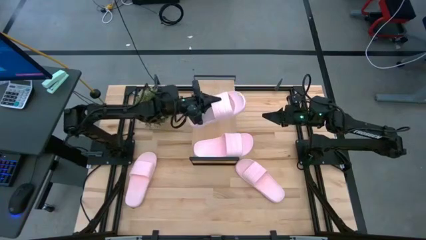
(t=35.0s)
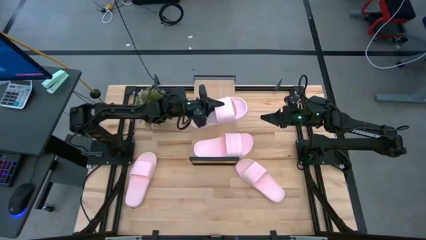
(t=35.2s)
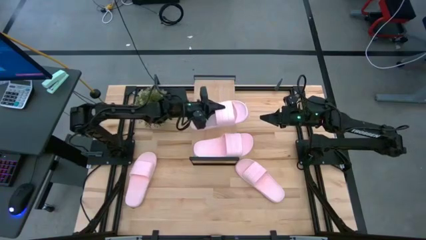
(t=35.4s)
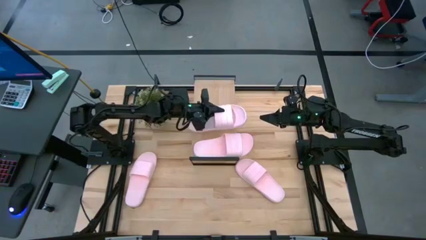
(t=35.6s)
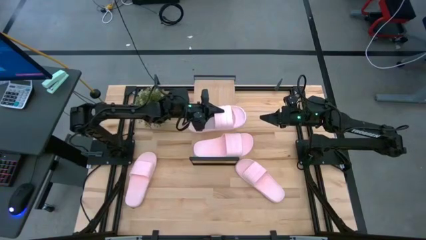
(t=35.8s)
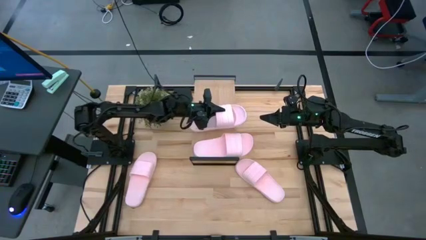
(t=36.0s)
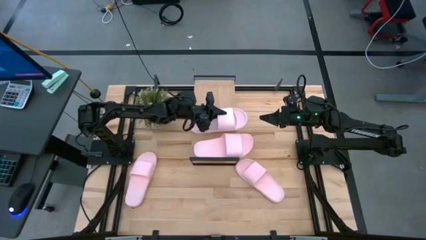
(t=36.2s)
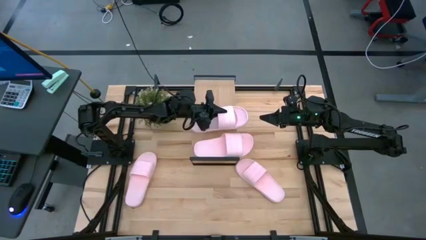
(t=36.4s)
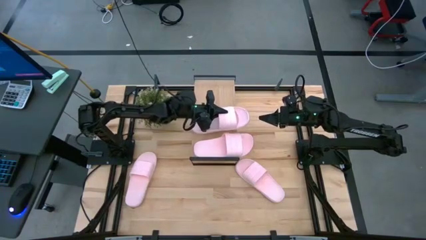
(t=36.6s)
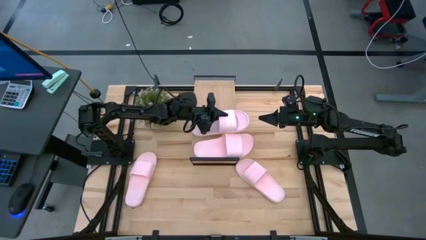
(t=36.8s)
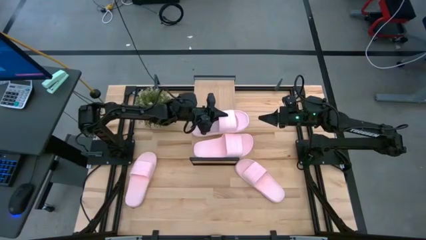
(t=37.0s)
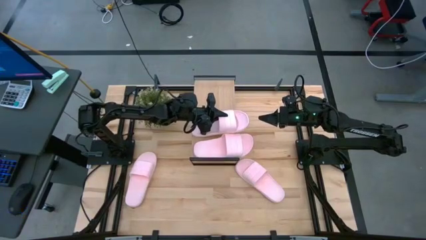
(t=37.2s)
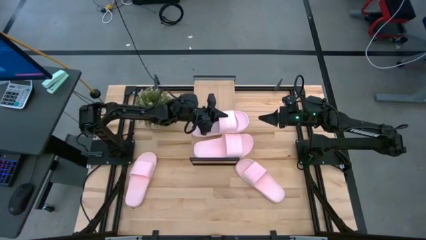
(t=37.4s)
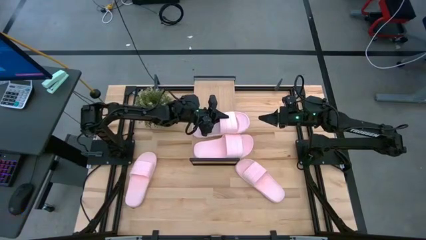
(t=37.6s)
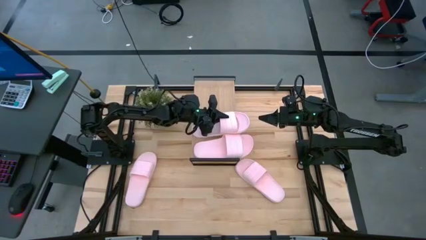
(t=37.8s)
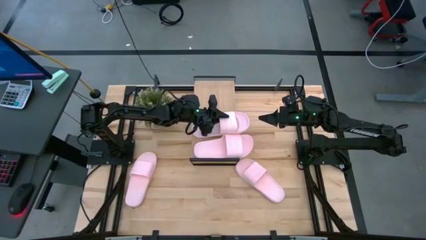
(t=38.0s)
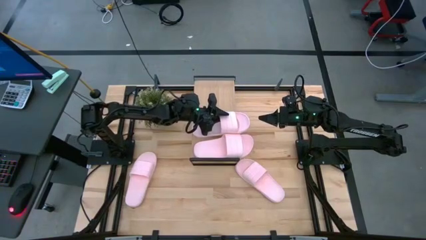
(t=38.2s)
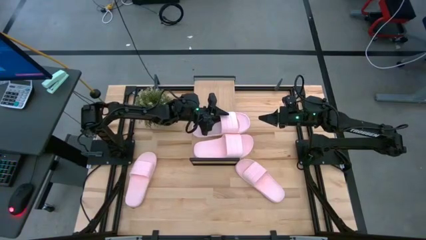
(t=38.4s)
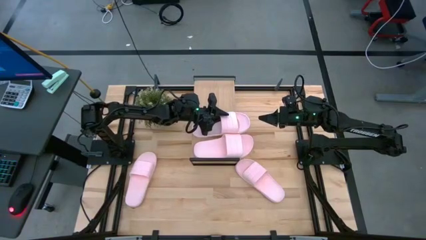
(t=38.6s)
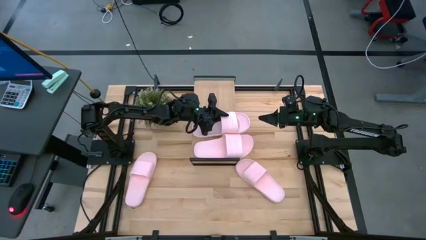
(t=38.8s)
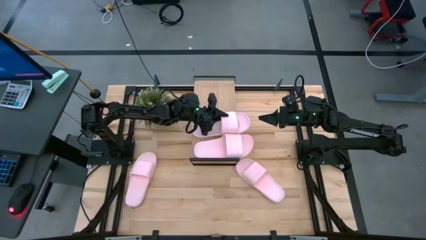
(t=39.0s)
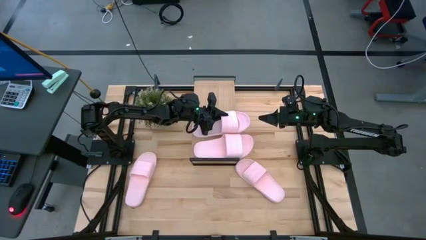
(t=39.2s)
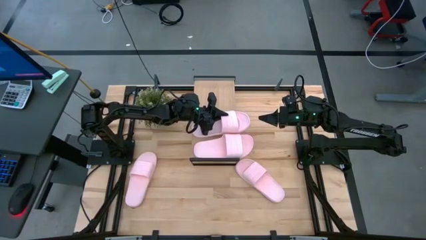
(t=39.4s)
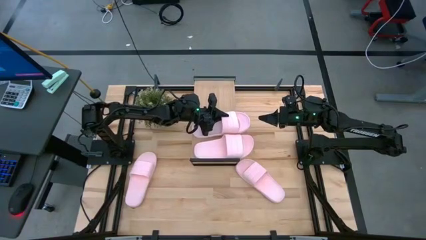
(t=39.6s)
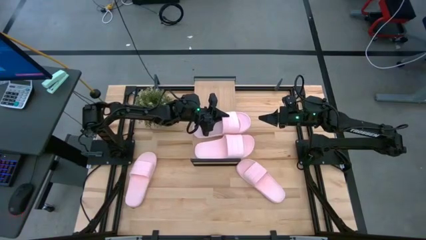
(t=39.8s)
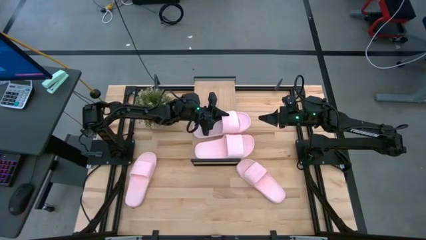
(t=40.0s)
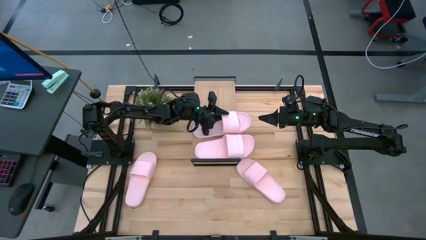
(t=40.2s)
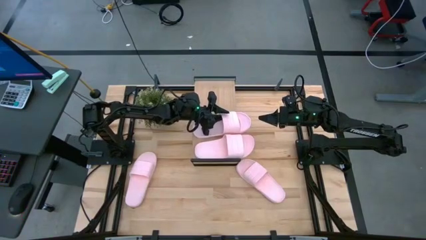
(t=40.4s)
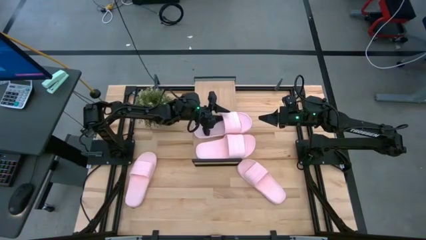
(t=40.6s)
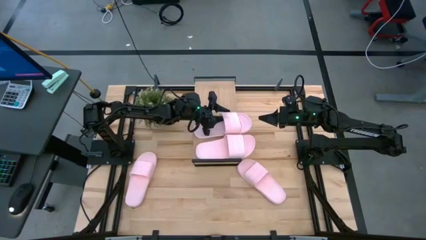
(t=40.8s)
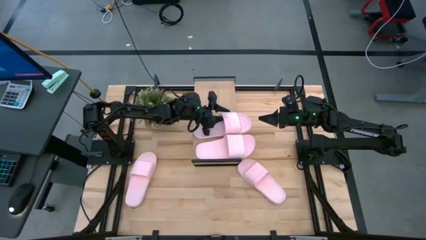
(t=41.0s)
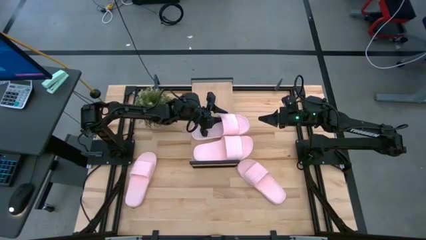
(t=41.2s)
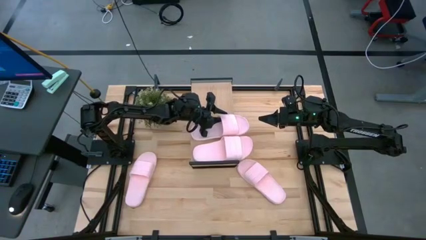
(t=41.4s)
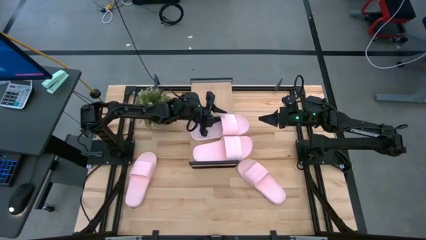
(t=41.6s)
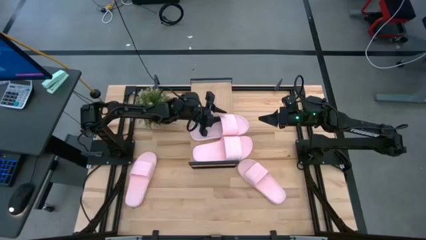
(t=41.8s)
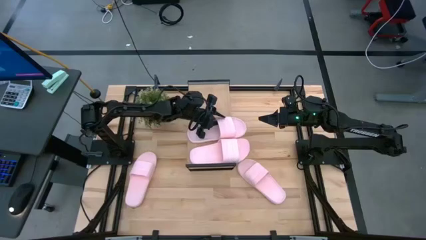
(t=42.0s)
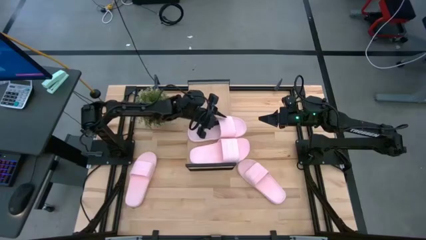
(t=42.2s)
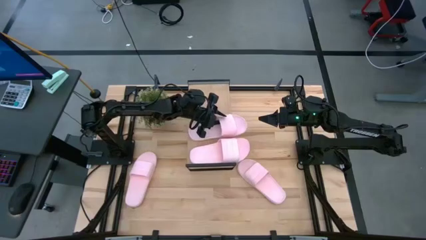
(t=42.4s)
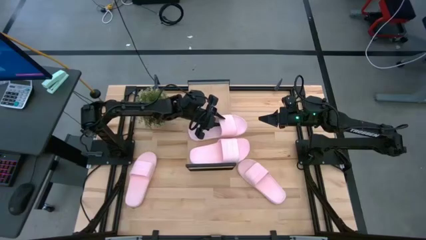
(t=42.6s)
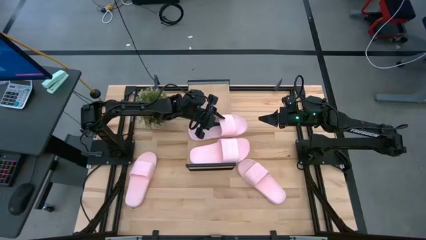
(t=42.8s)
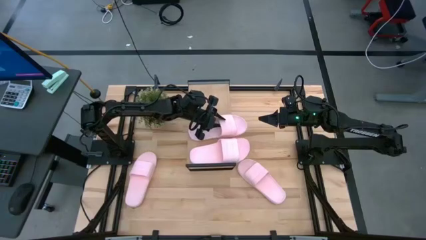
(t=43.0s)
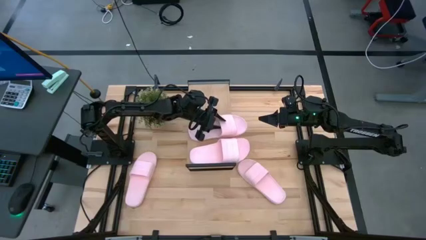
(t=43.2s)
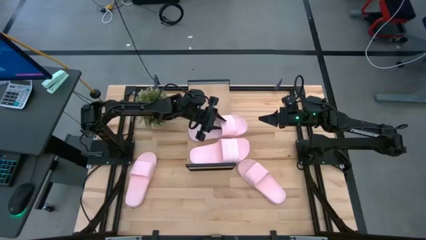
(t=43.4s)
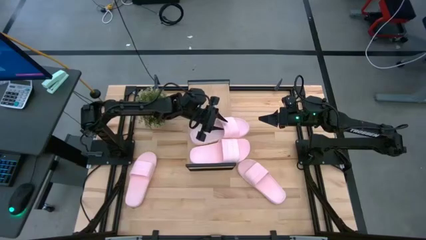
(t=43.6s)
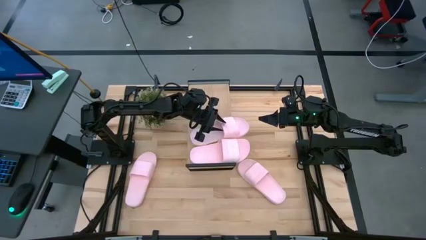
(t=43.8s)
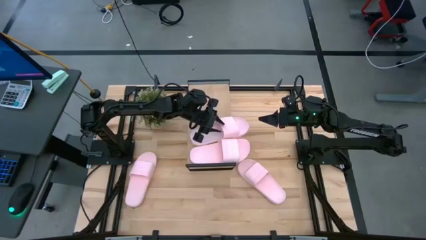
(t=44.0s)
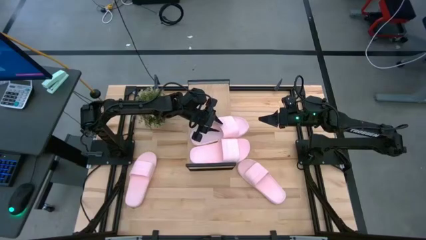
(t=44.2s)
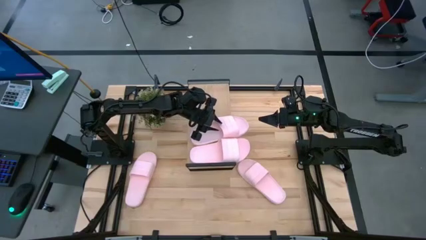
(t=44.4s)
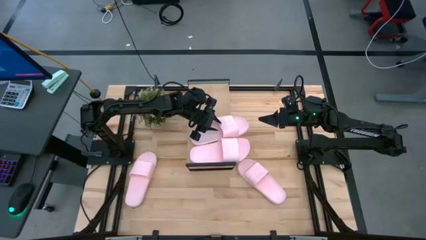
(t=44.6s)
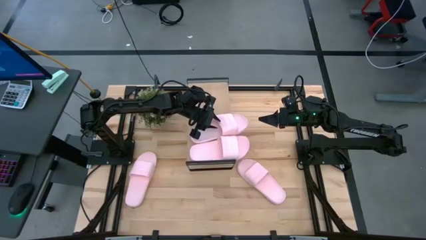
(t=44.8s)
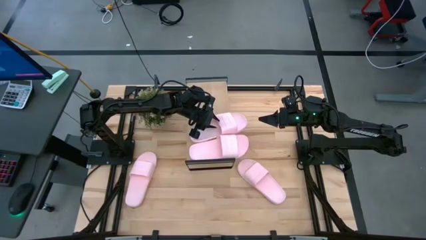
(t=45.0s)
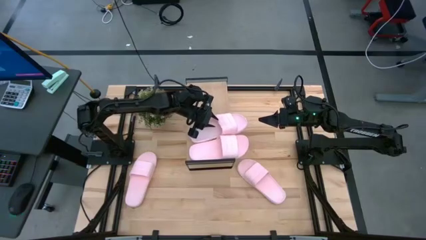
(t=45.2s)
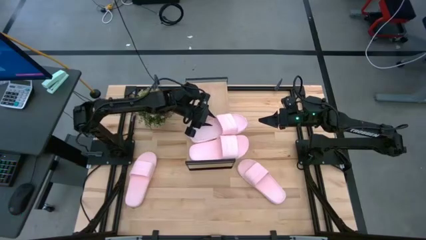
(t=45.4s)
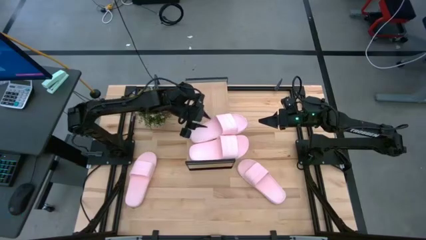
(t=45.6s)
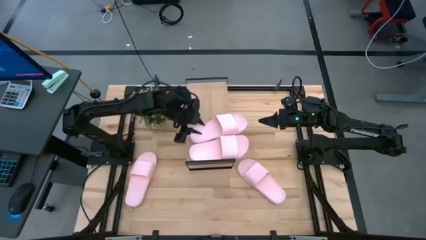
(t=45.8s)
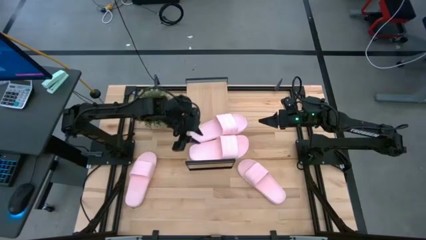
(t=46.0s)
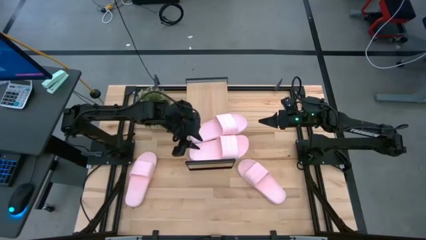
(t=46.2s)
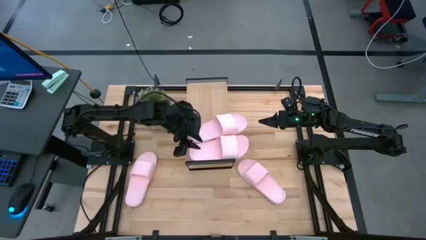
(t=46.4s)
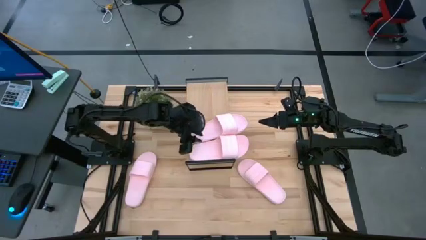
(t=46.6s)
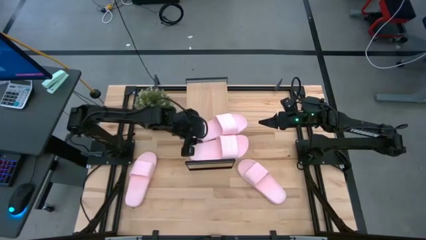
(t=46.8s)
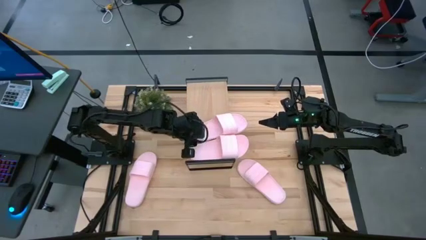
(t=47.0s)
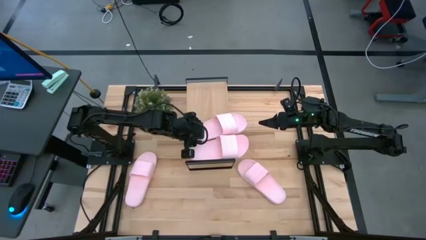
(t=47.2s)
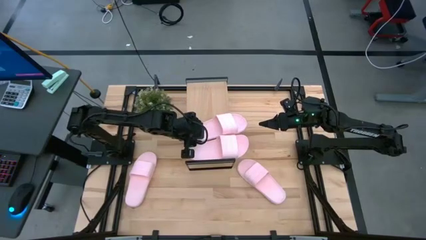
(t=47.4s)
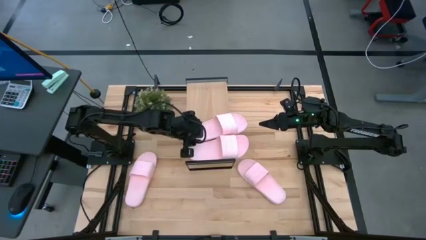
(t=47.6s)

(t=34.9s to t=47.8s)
Task: Pick and place slides into the shelf
Put the pink slide on the shelf

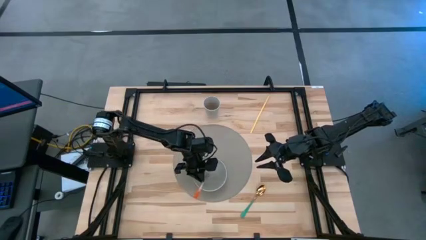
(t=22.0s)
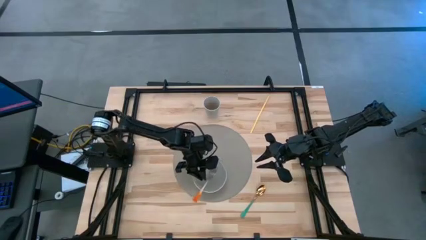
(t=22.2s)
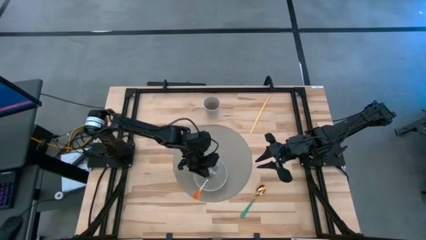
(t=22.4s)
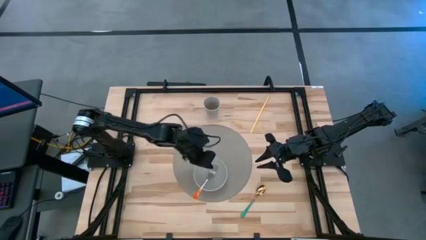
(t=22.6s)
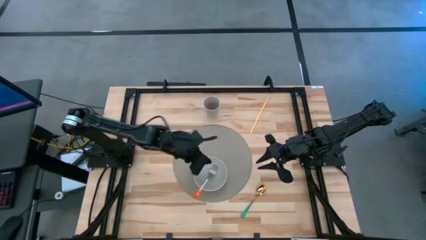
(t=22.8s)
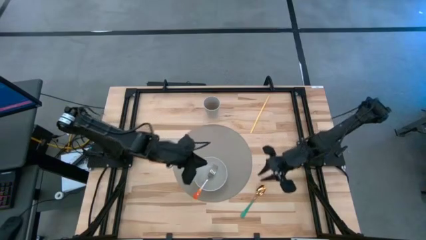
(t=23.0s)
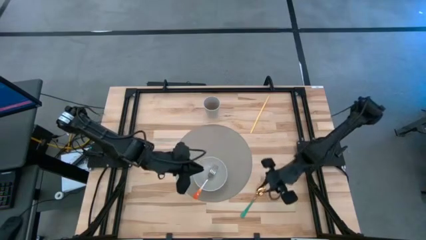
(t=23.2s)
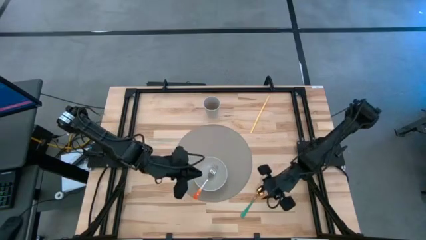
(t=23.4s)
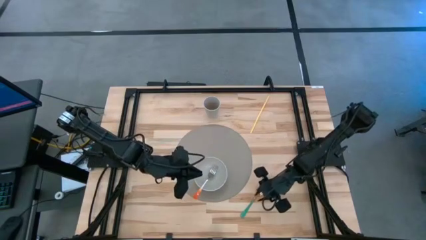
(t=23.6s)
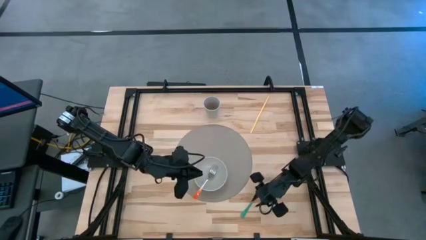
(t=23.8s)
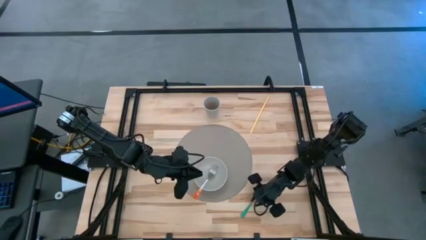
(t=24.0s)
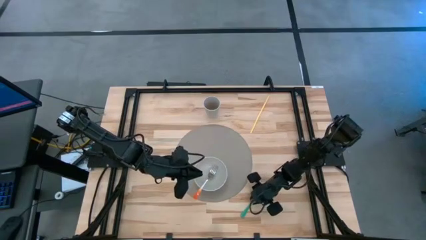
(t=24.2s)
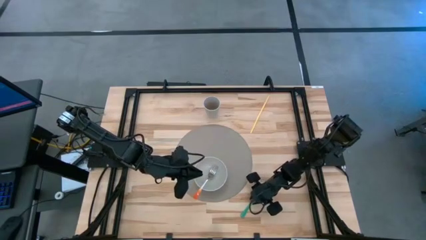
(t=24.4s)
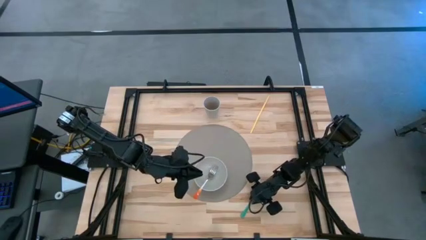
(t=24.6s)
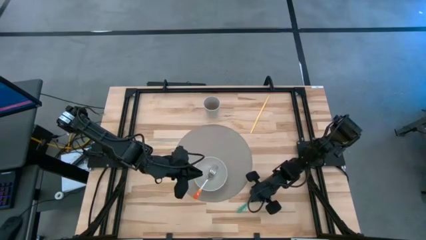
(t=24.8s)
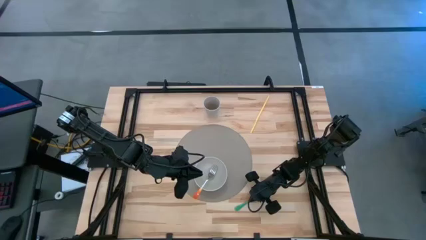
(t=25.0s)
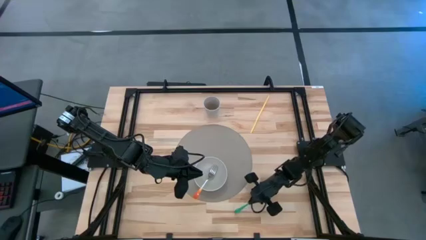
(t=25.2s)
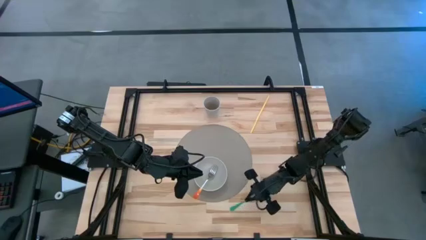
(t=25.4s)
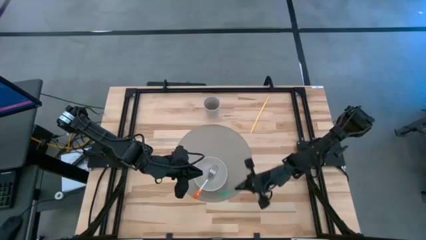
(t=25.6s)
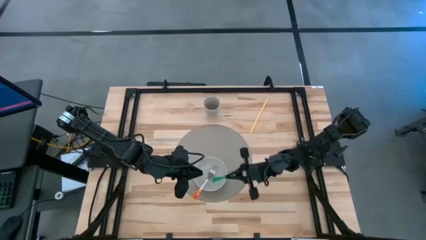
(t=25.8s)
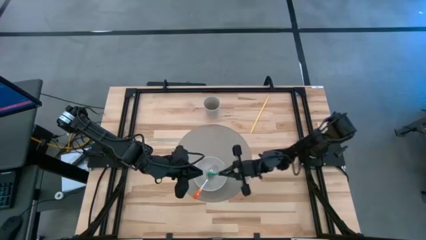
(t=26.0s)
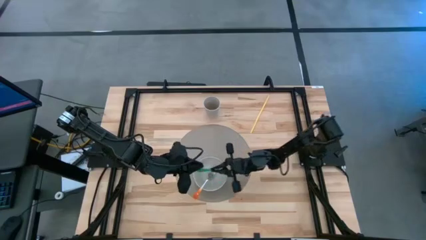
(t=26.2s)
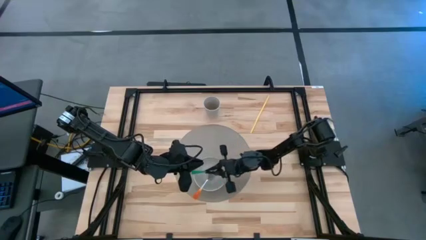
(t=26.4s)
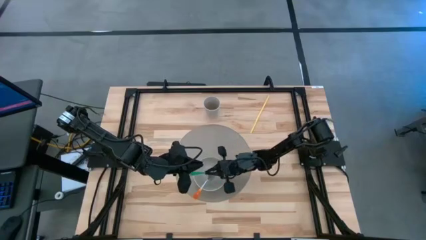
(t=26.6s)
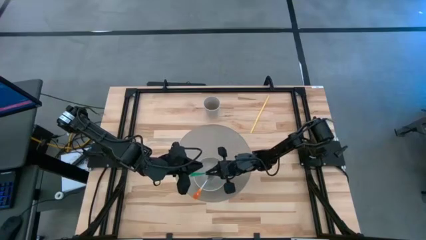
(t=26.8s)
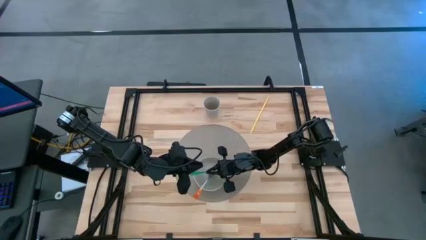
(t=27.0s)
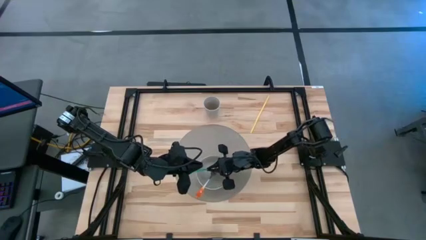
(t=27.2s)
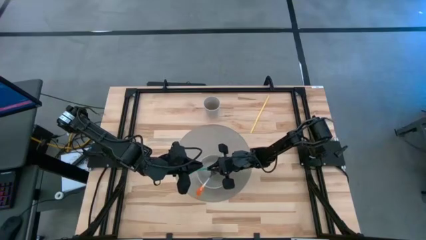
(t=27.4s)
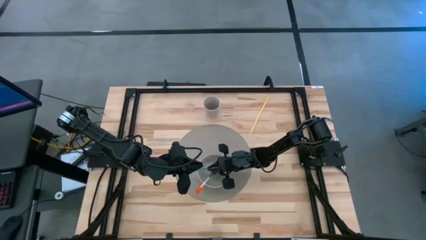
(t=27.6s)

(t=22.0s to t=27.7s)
Task: Pick & Place Utensil
Put the green spoon in the white bowl on the gray placemat
